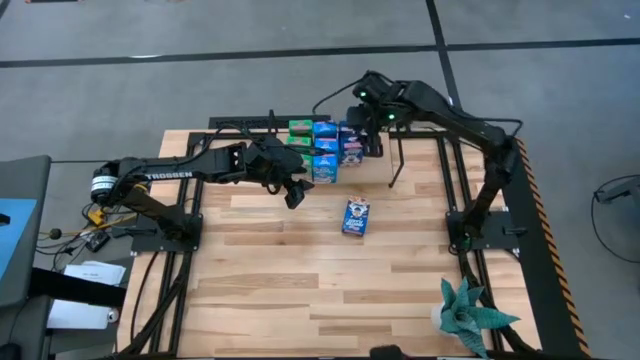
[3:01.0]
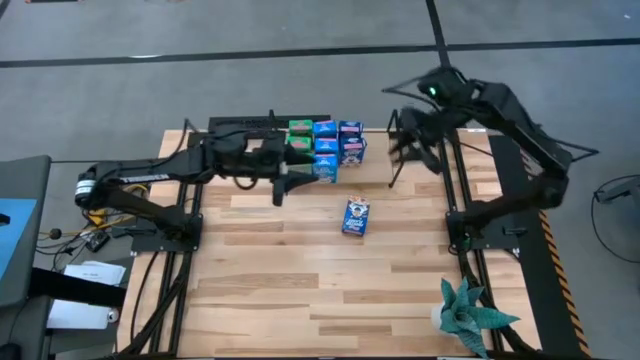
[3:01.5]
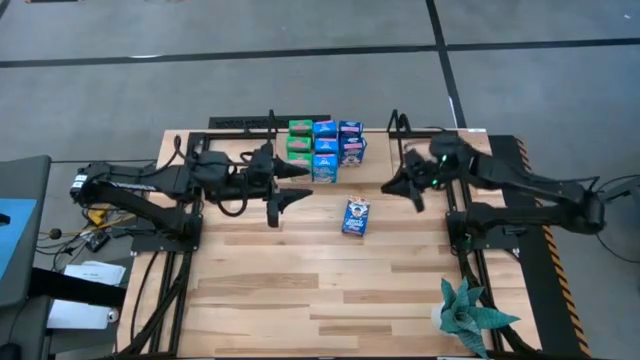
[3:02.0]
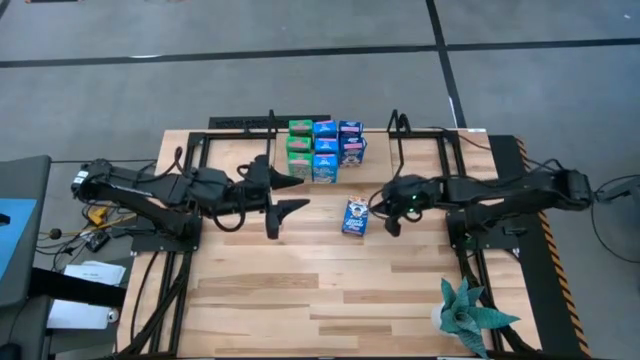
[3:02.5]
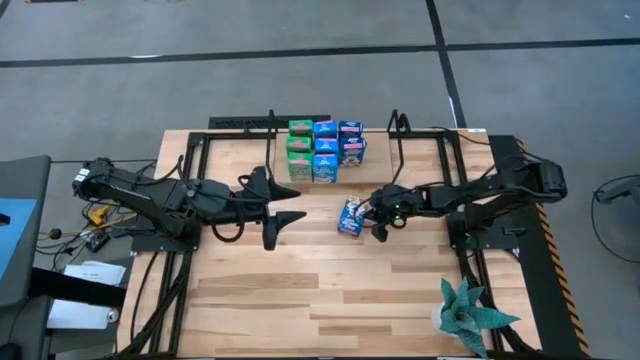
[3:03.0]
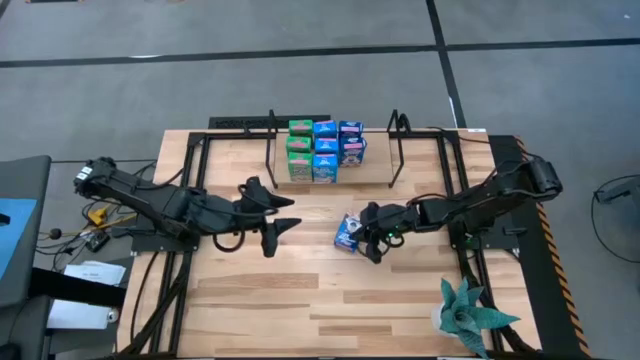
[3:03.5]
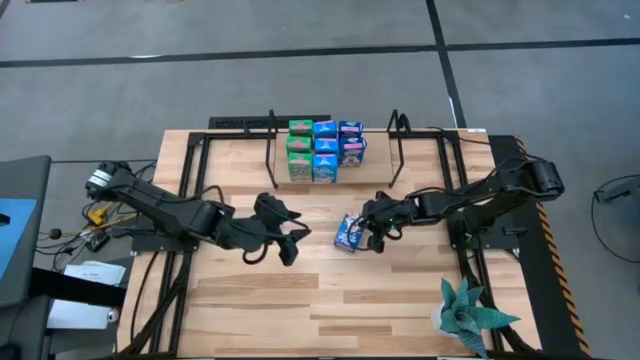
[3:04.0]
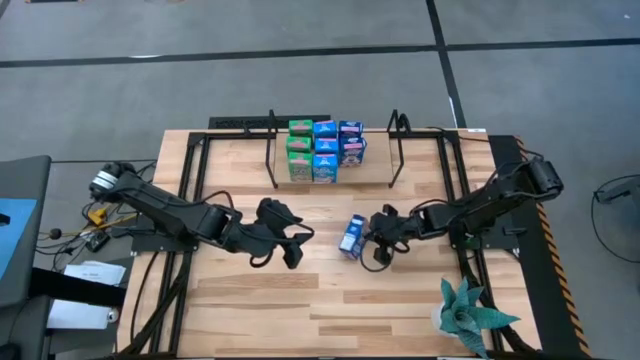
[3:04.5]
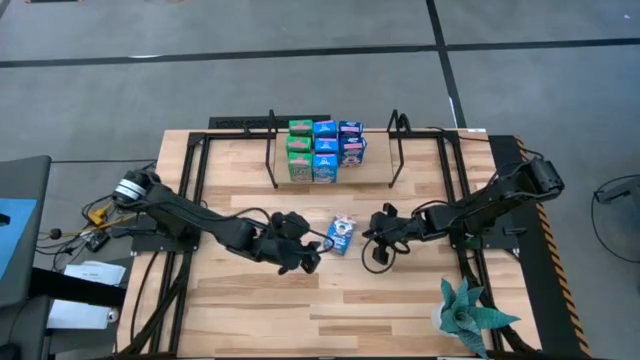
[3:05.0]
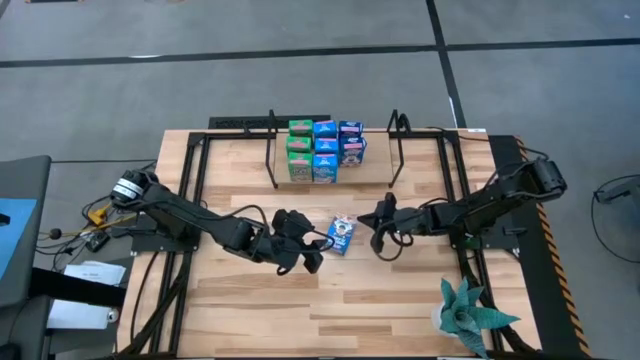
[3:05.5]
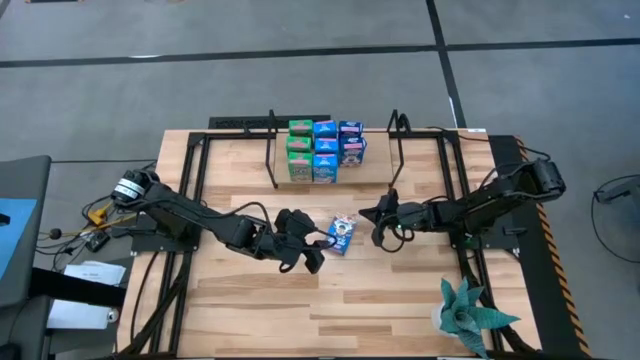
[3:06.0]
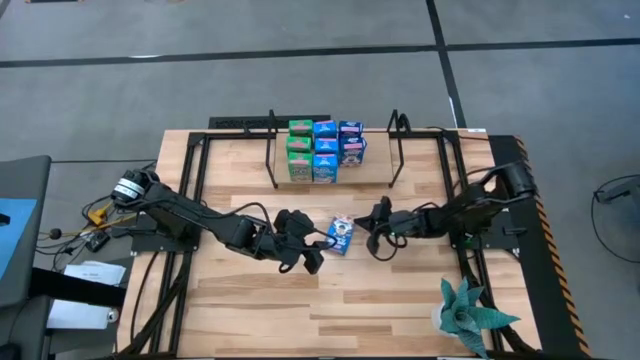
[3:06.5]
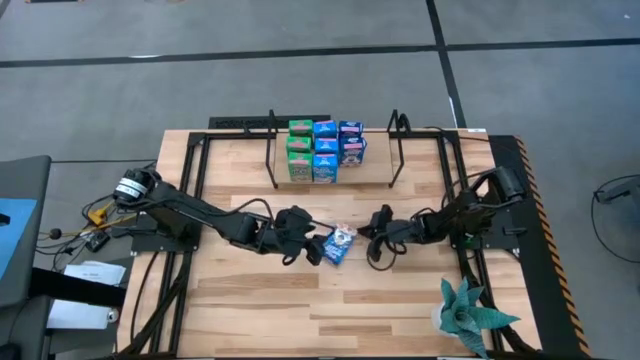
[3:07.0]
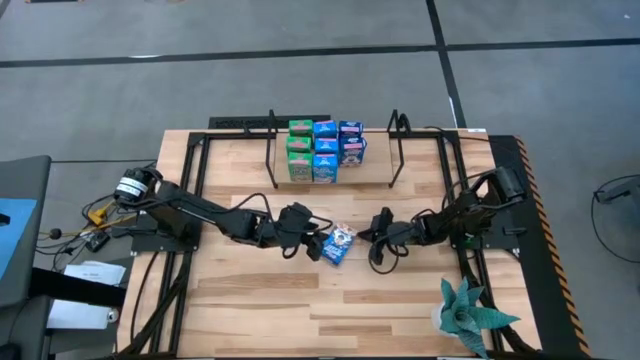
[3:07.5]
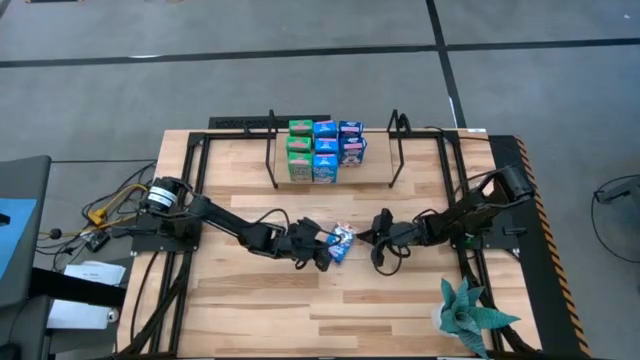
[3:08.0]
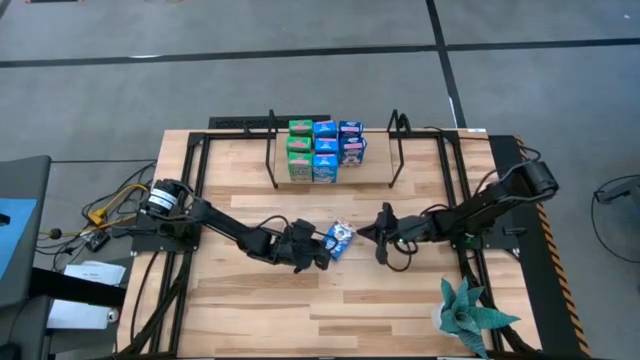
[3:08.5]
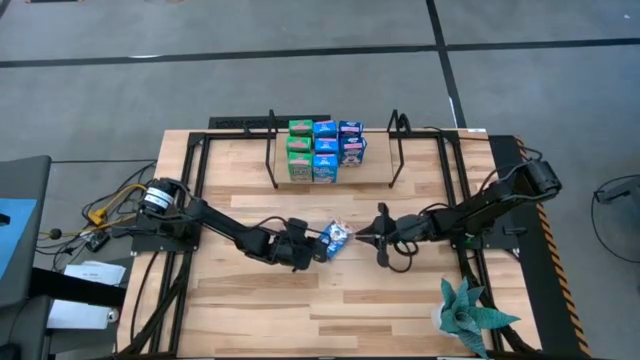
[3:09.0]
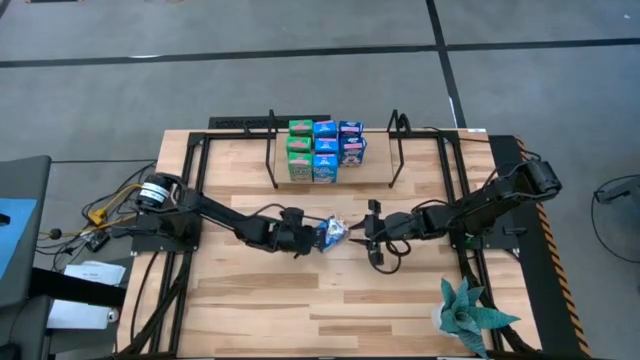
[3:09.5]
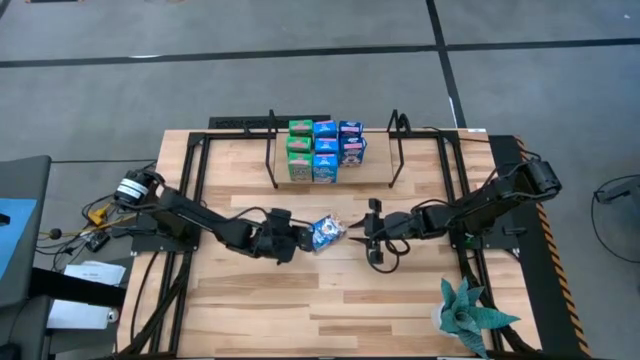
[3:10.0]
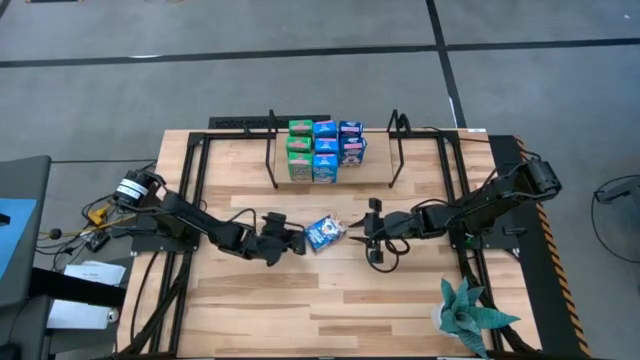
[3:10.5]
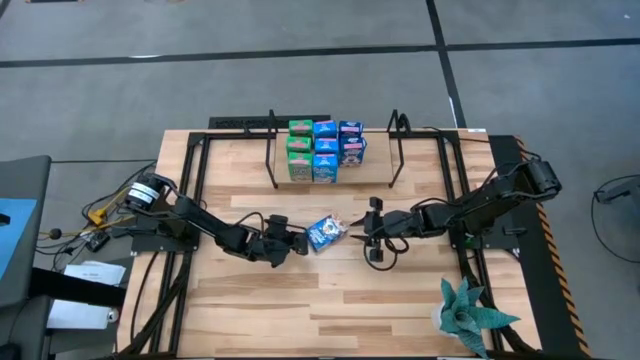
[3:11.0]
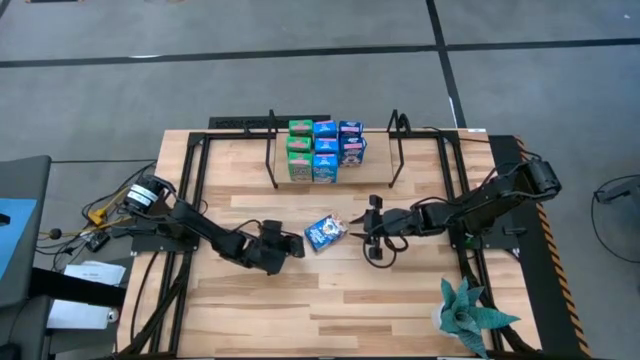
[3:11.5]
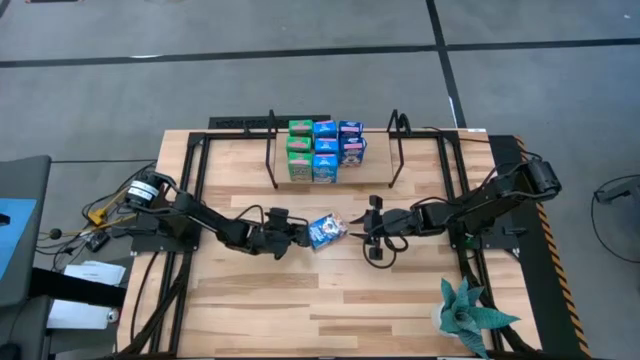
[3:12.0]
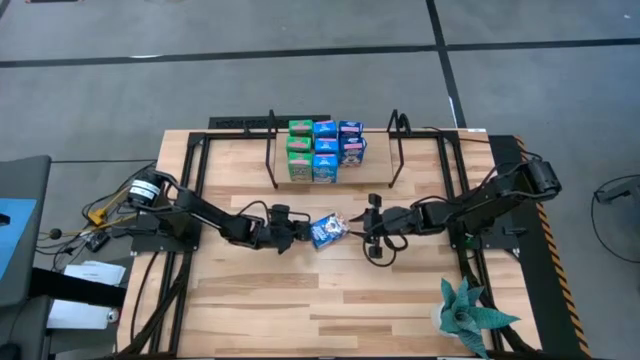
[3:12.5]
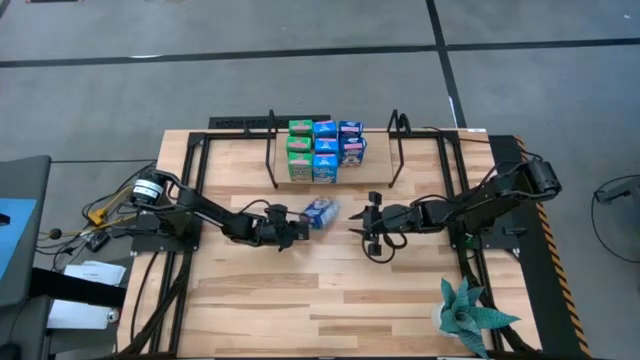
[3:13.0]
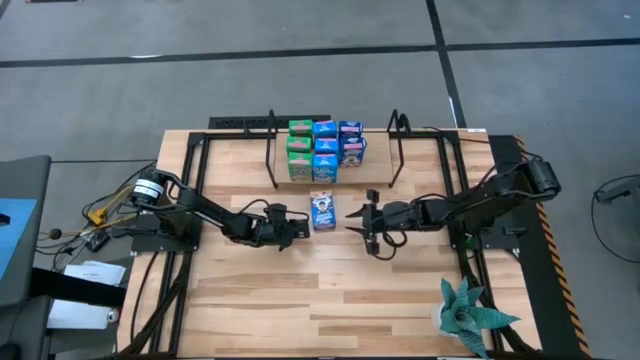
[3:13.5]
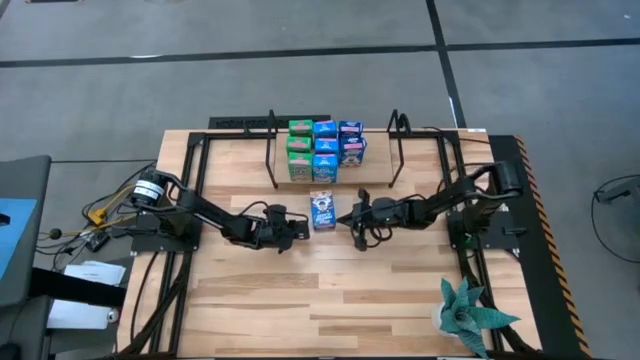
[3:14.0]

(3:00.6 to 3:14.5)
Task: Stack cereal on shelf
Put the blue cereal box on the shelf aligned with the blue cereal box

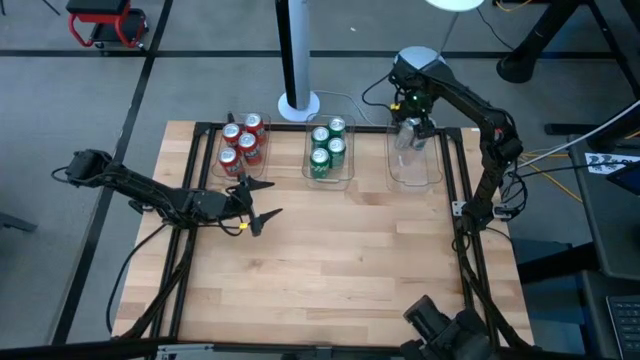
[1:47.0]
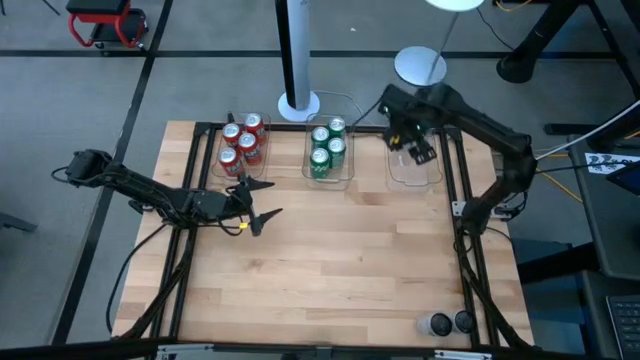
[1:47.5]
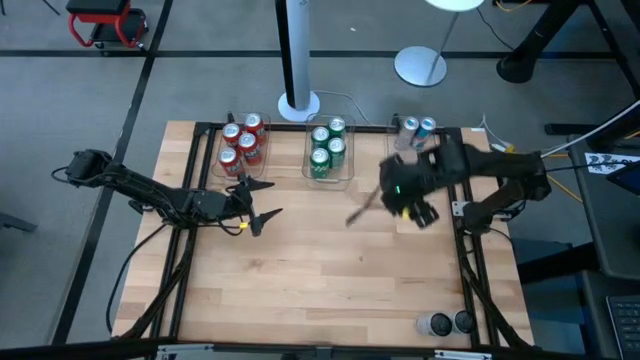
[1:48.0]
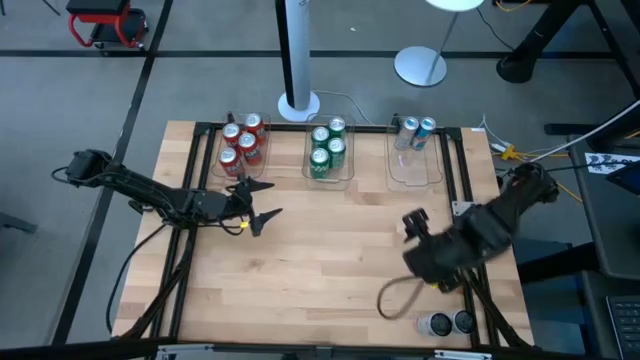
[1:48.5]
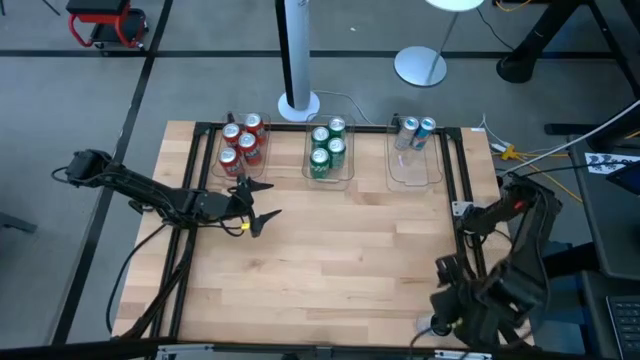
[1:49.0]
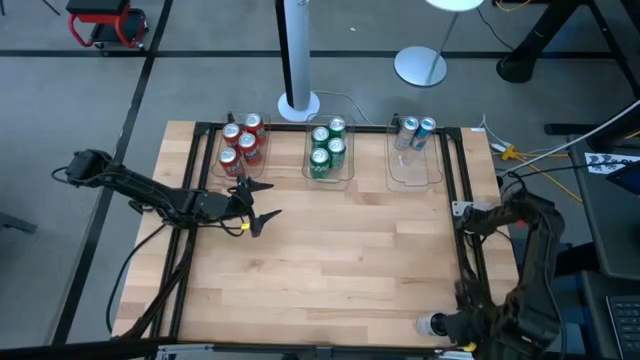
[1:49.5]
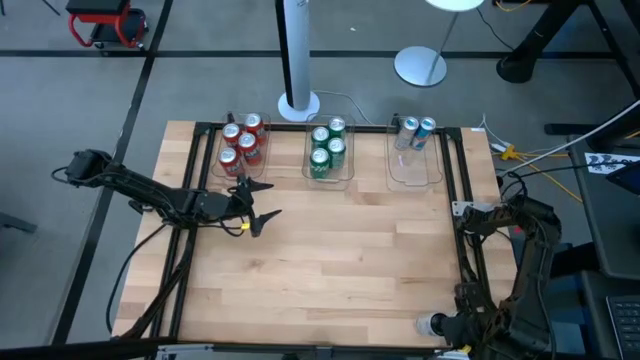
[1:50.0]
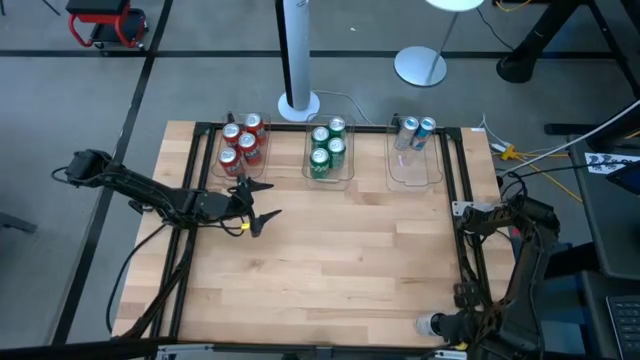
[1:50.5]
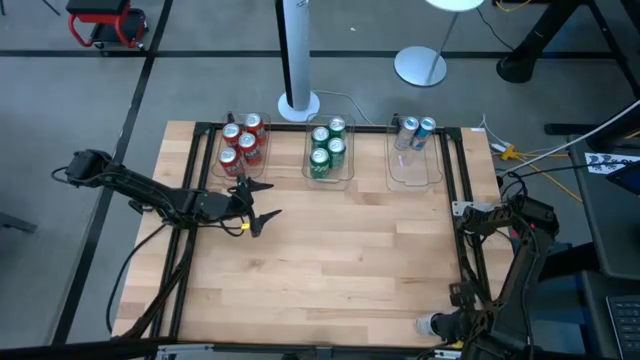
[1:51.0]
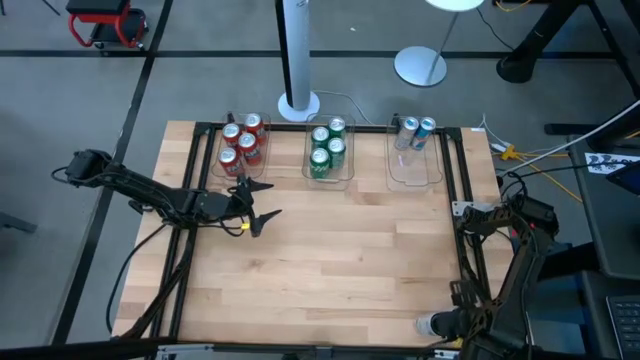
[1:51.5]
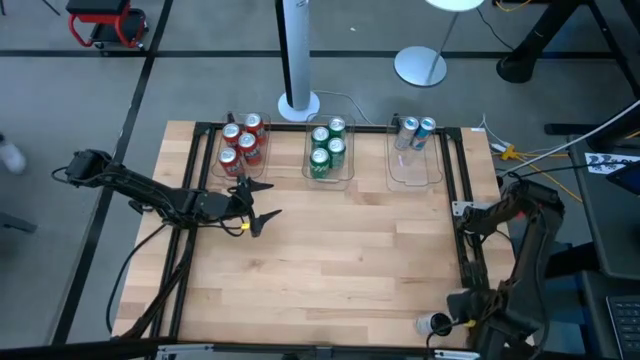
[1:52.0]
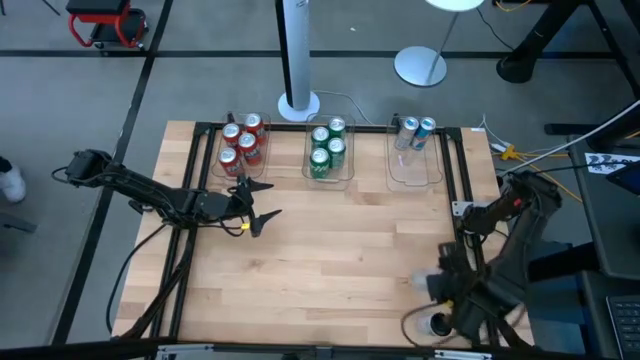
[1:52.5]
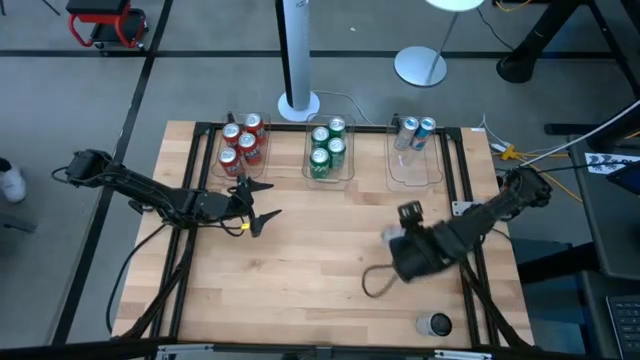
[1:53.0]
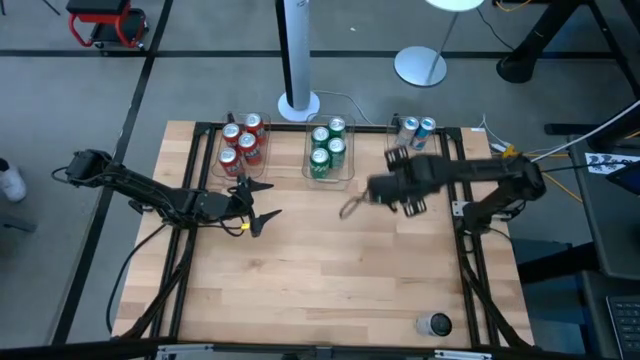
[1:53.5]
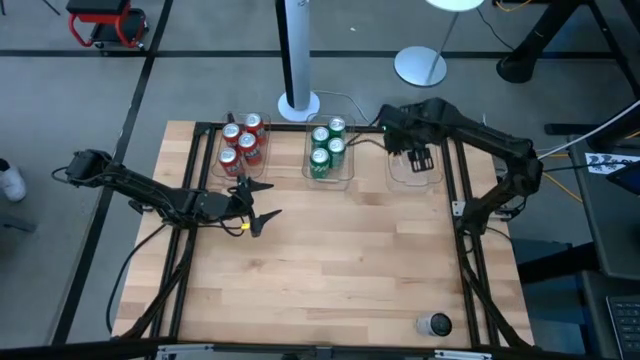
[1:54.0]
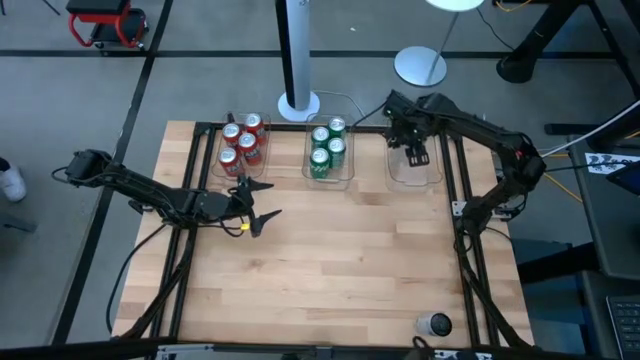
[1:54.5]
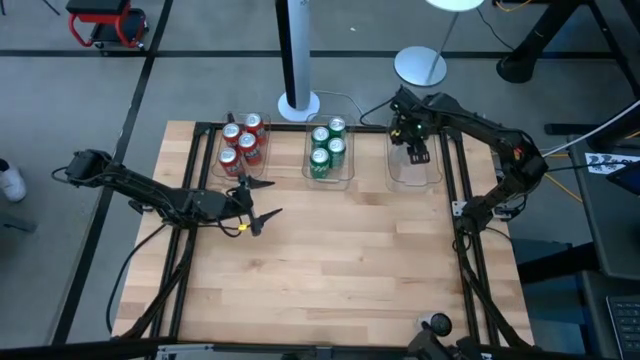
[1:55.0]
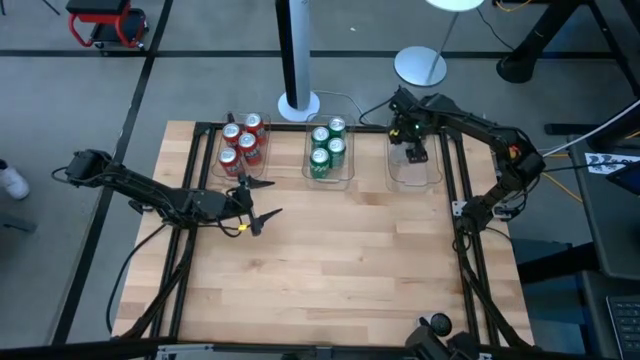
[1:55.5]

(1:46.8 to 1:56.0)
Task: Sort soda cans
Put the right white-pink soda can into the right transparent bin
